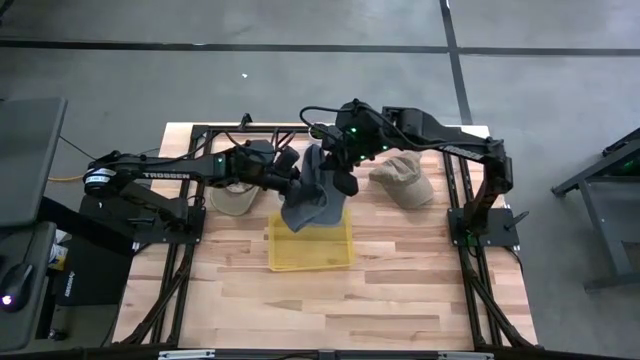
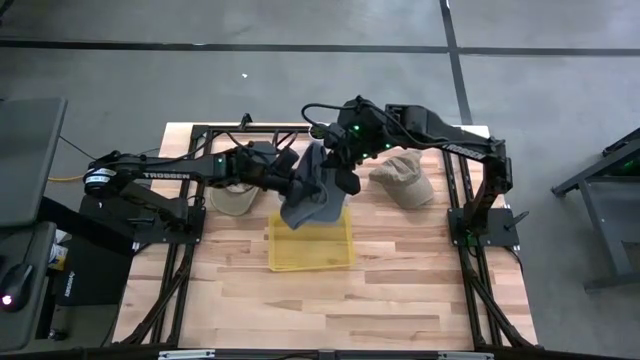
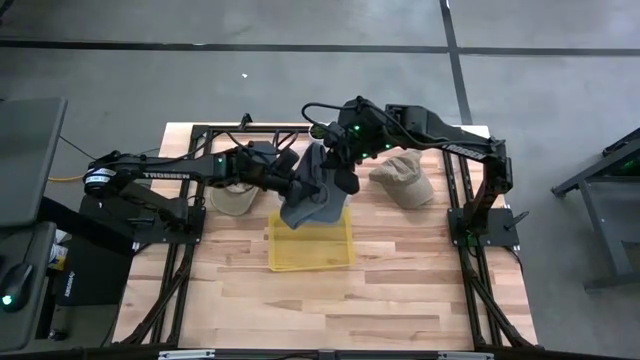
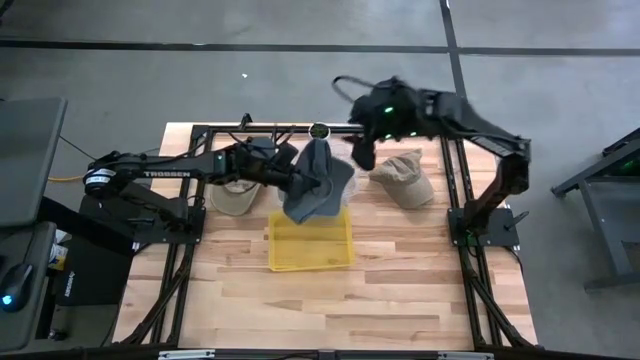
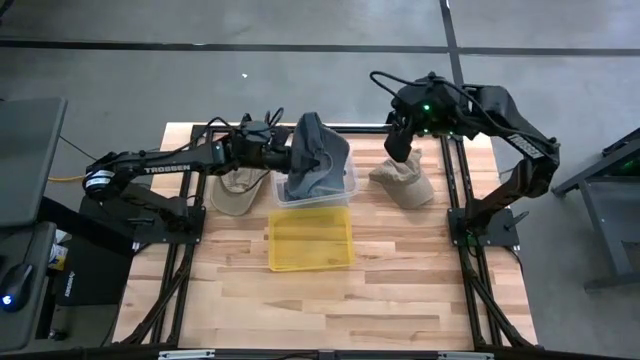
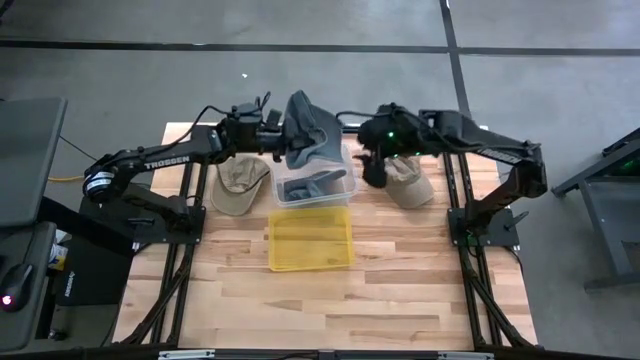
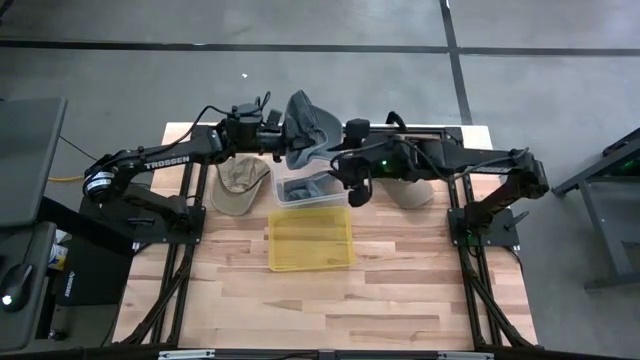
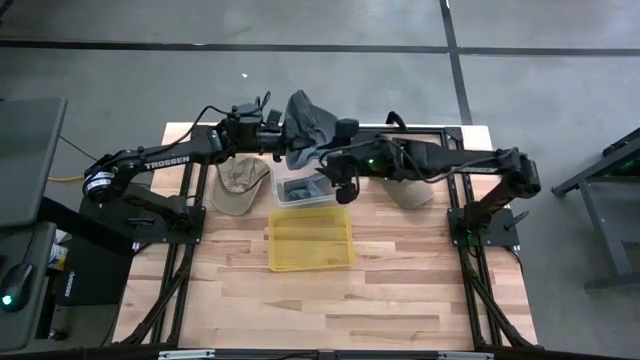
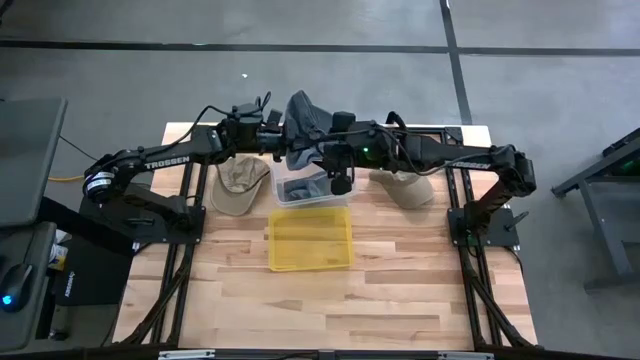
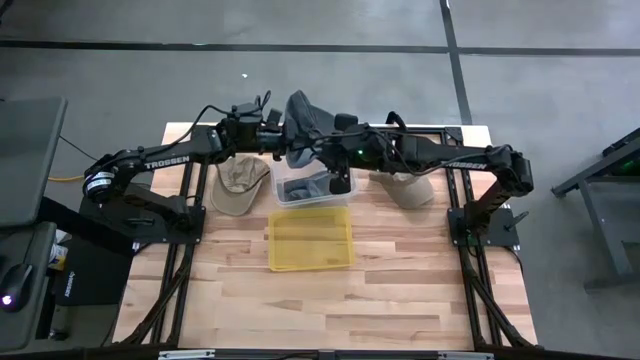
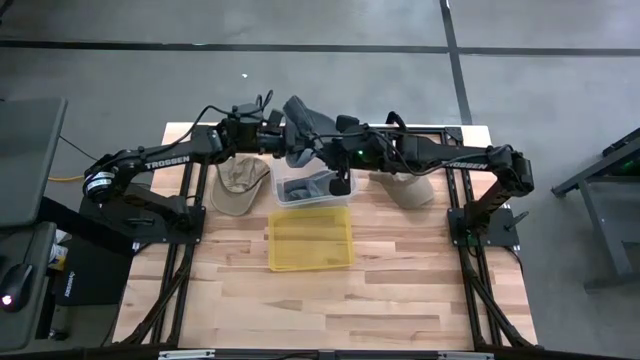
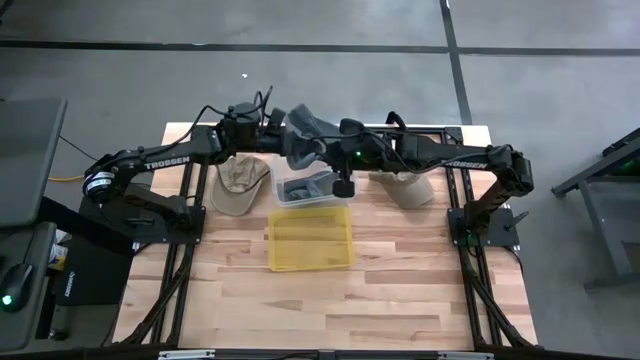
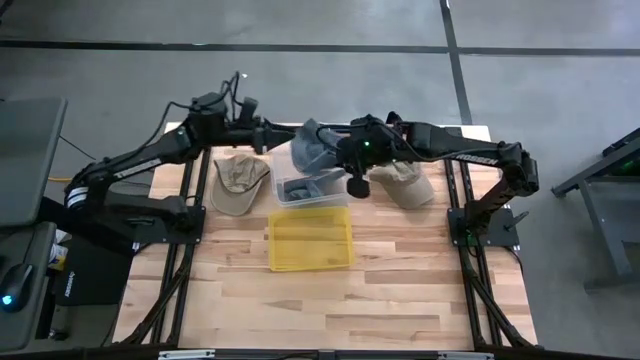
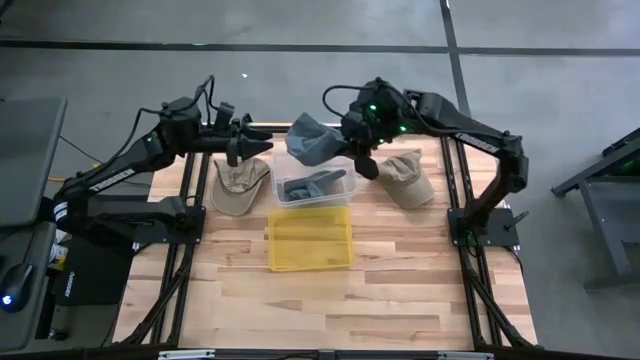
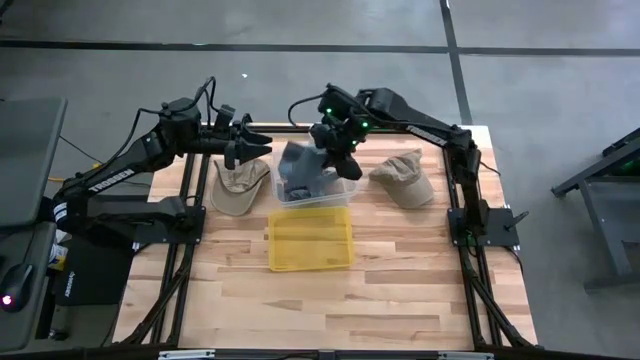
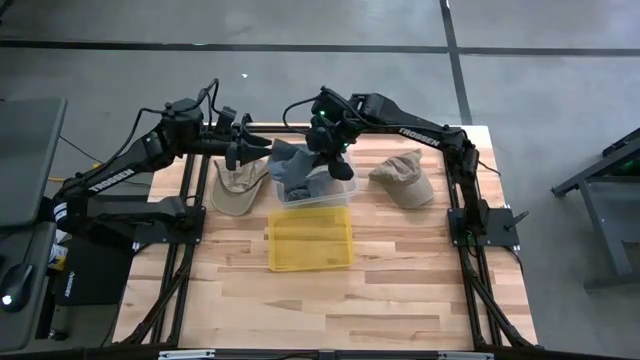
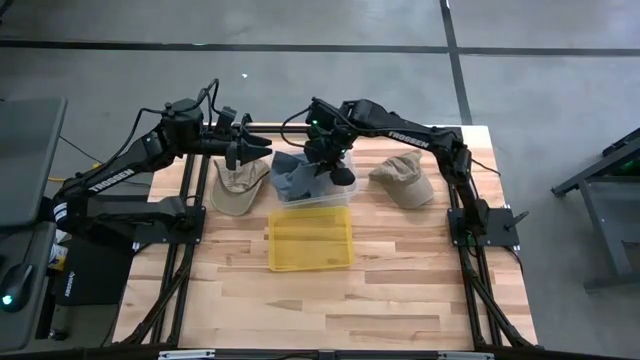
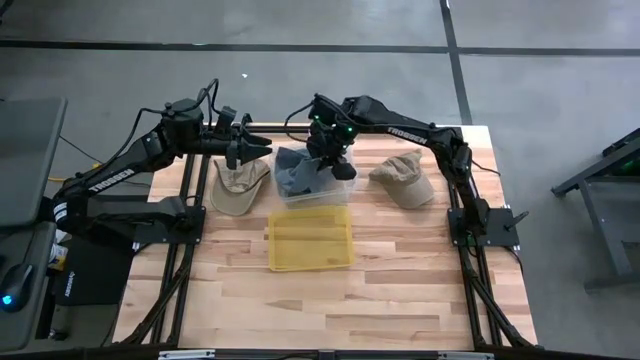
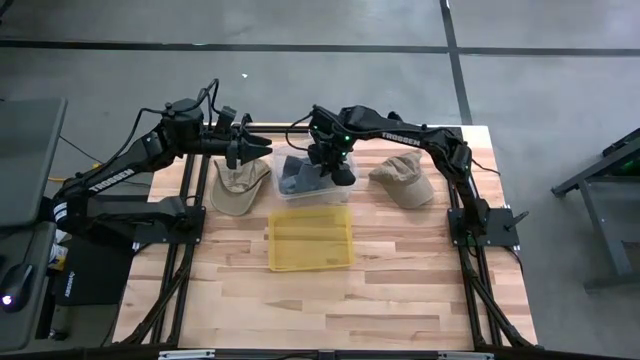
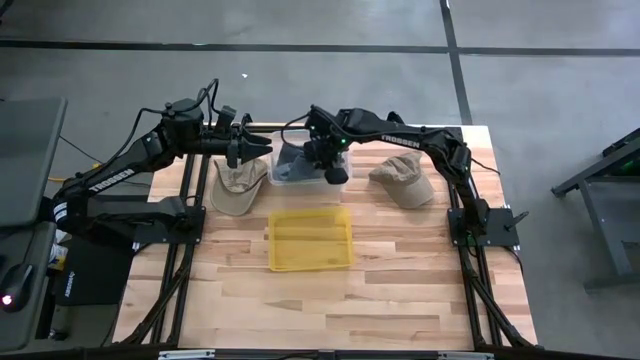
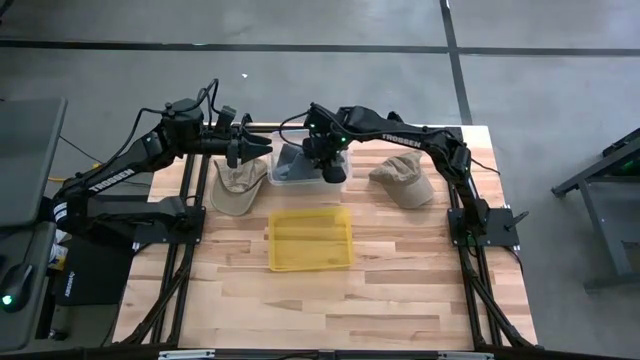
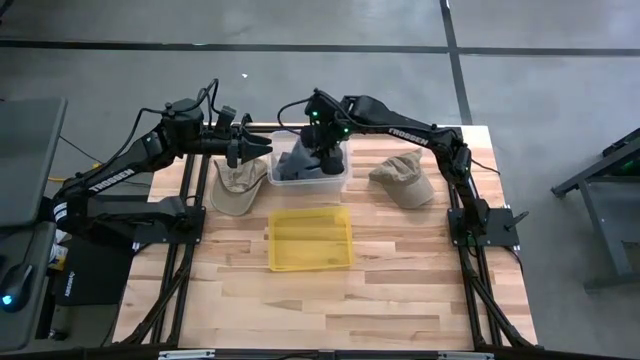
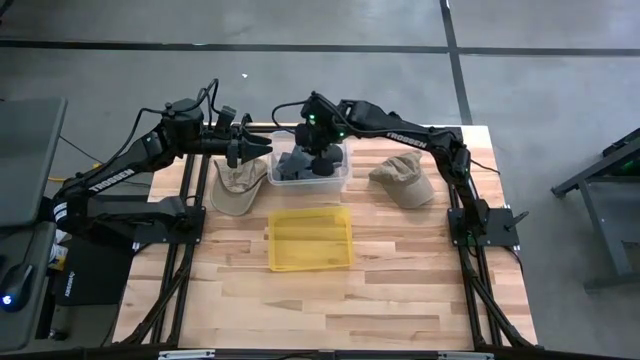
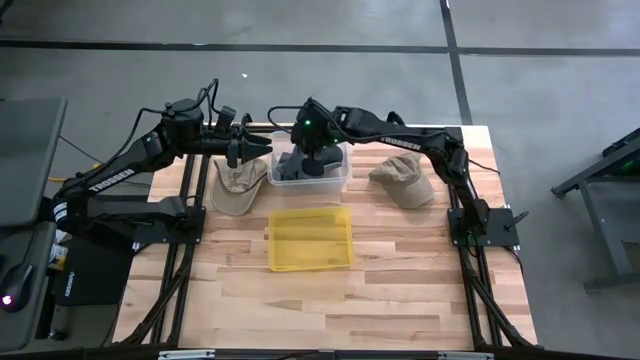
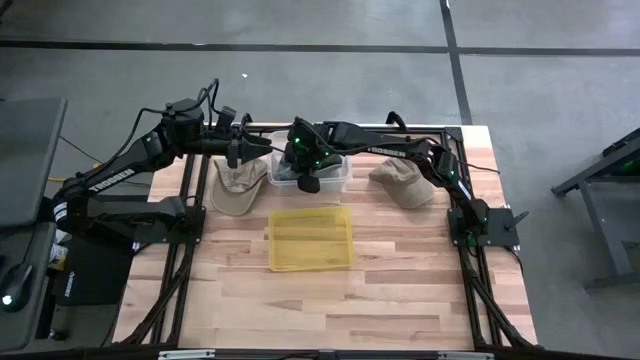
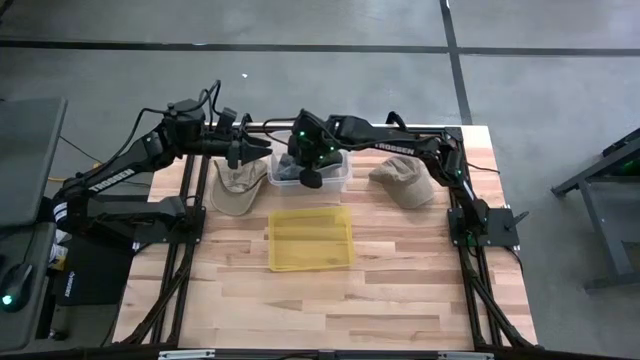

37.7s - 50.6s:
Task: Pick & Place hat
Put the gray cap into the transparent bin

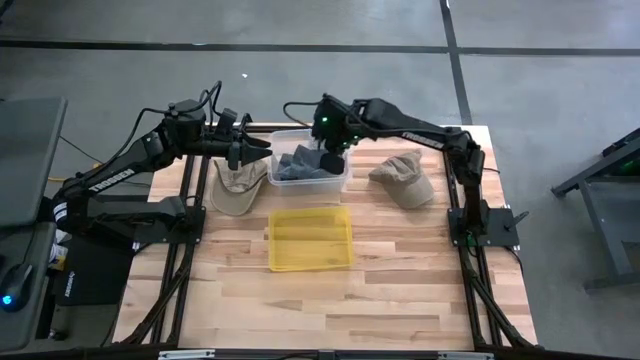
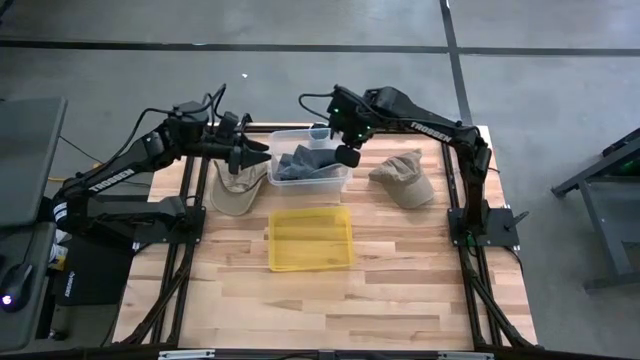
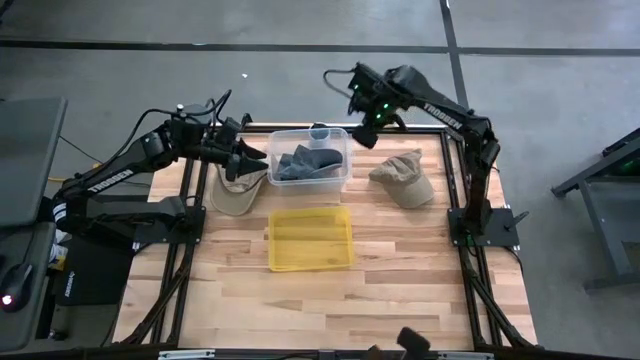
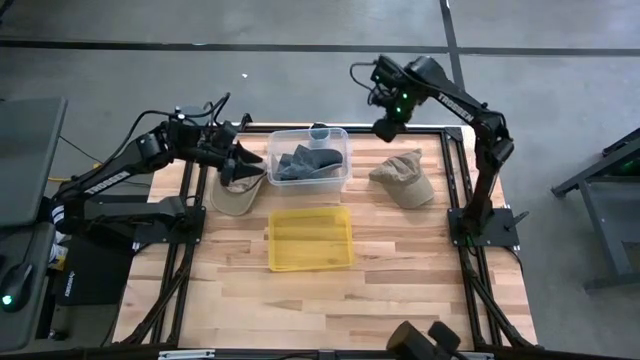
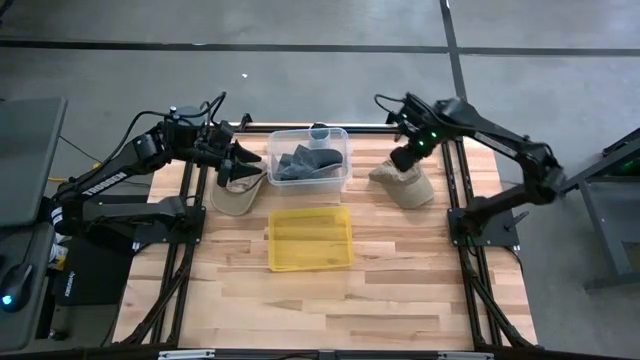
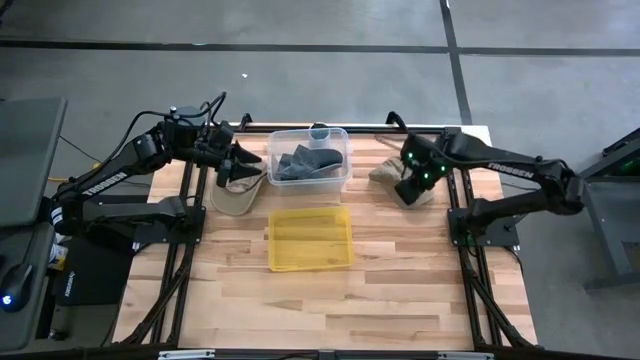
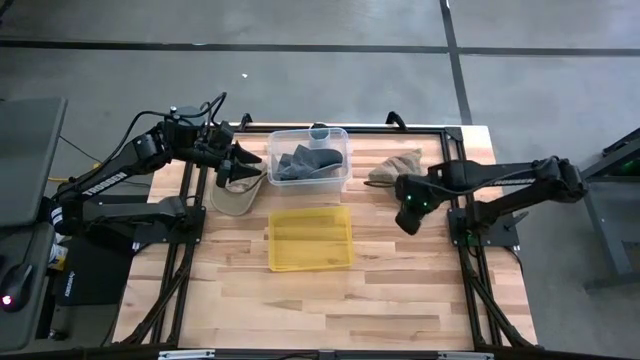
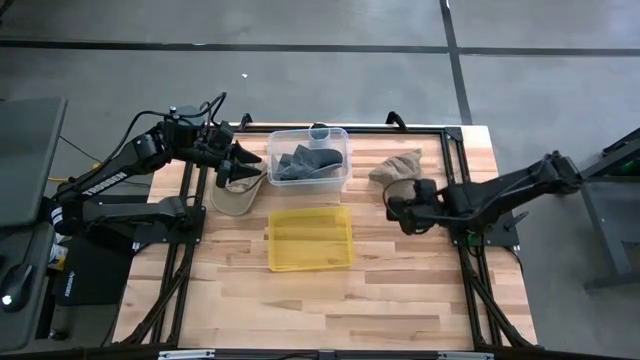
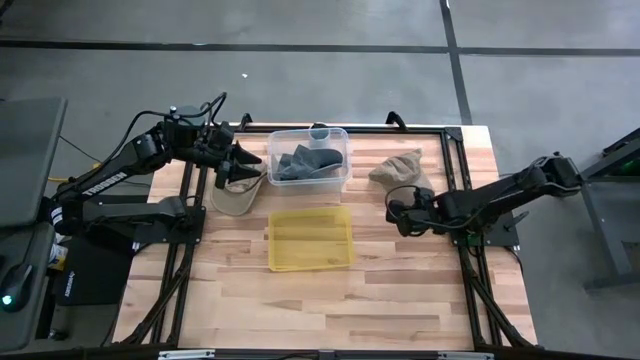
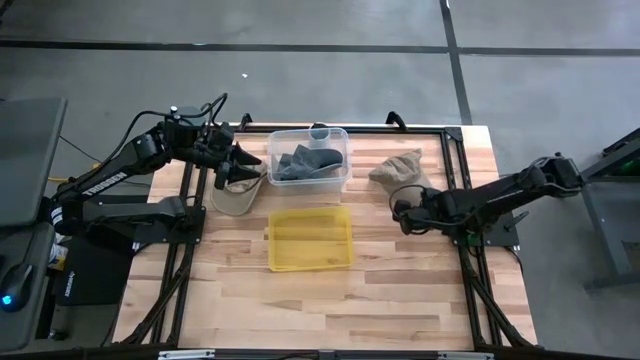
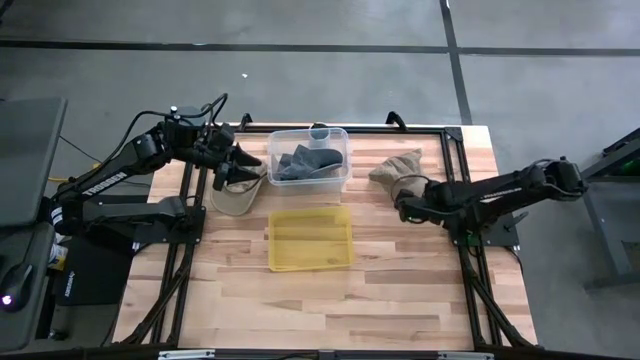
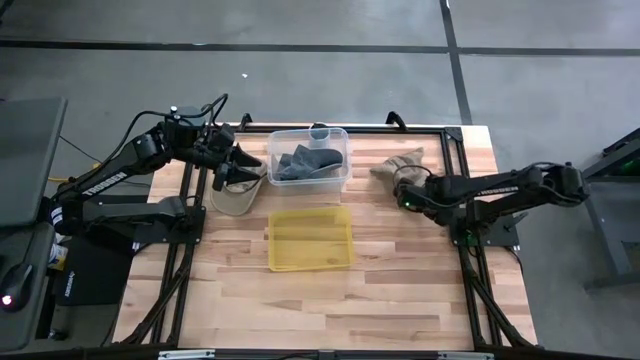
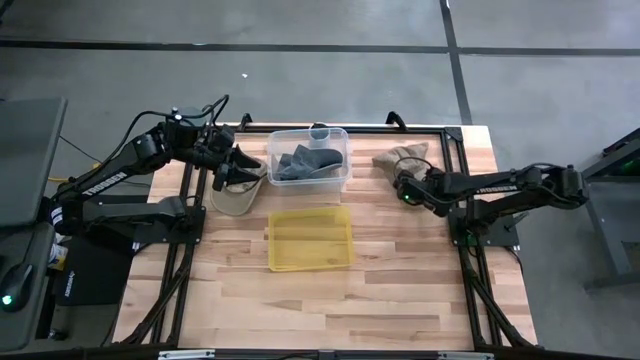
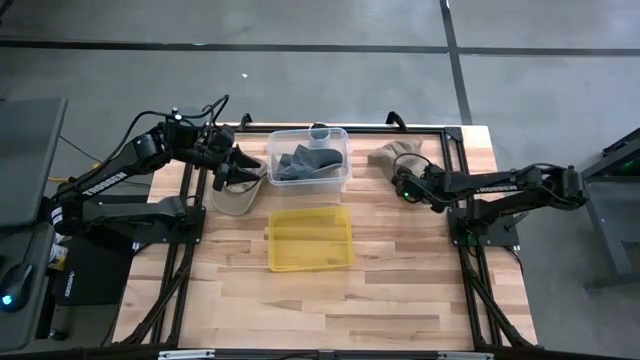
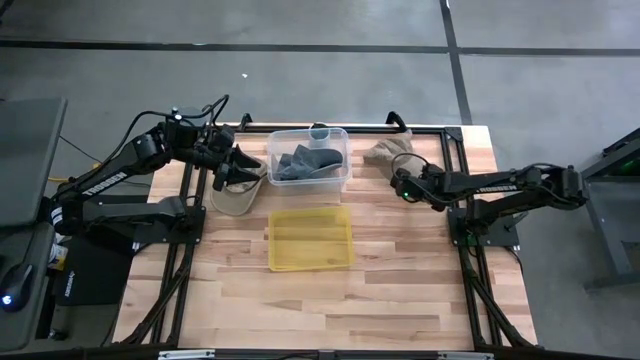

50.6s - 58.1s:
Put the right brown cap into the yellow bin
